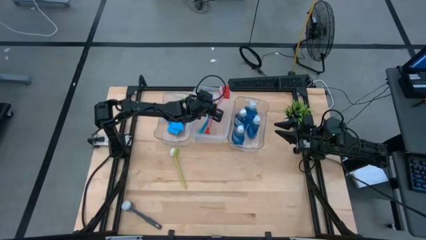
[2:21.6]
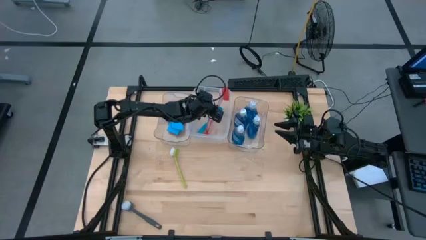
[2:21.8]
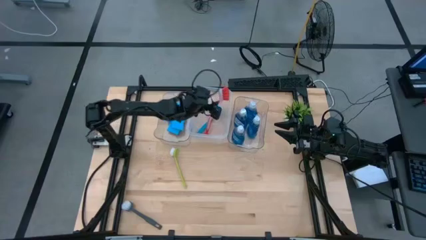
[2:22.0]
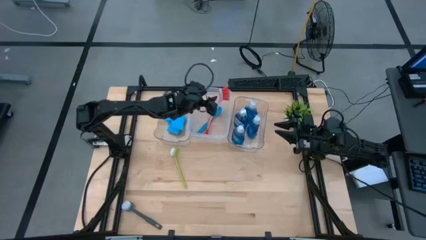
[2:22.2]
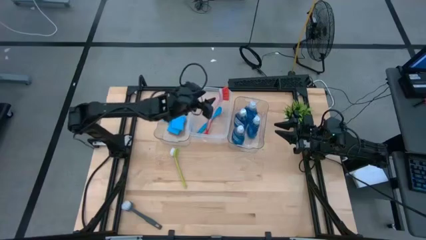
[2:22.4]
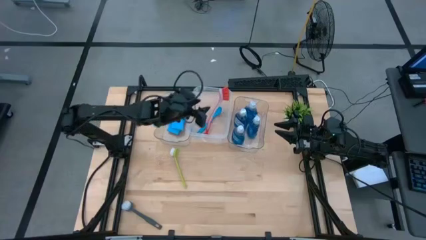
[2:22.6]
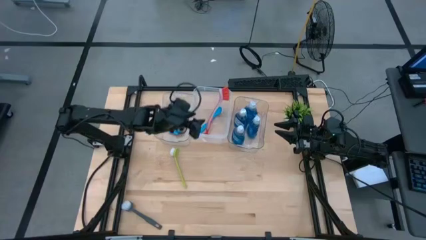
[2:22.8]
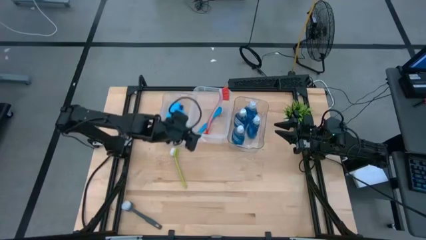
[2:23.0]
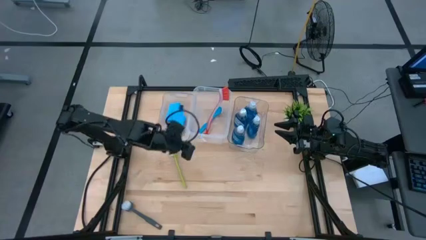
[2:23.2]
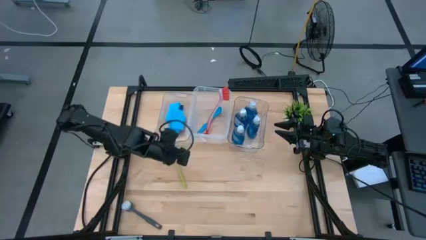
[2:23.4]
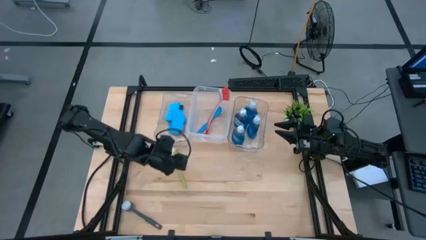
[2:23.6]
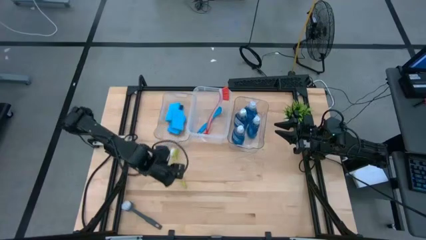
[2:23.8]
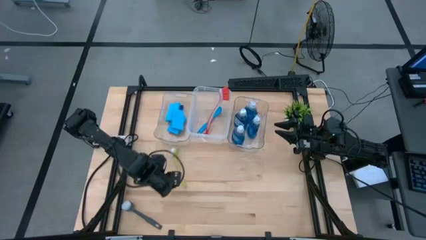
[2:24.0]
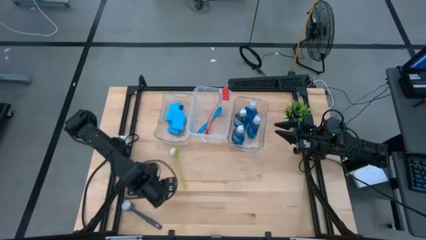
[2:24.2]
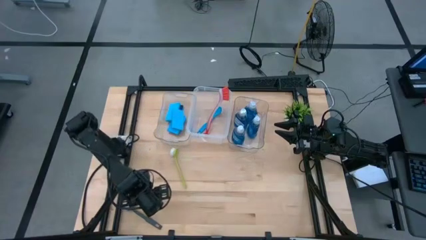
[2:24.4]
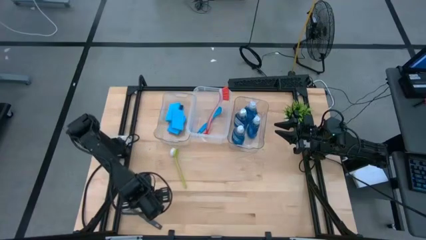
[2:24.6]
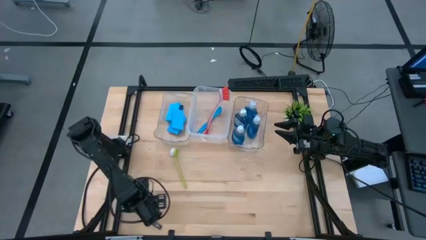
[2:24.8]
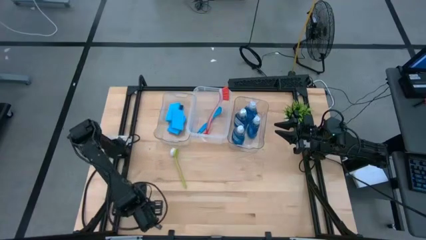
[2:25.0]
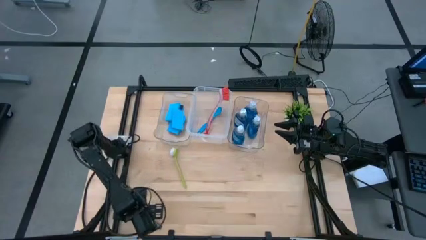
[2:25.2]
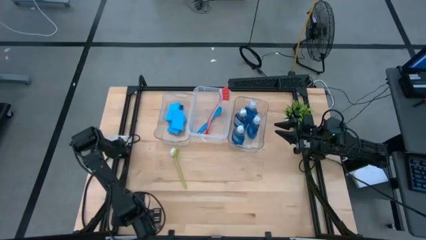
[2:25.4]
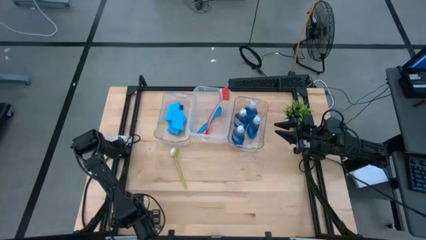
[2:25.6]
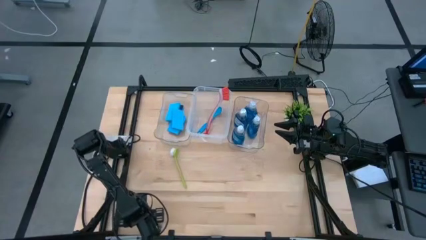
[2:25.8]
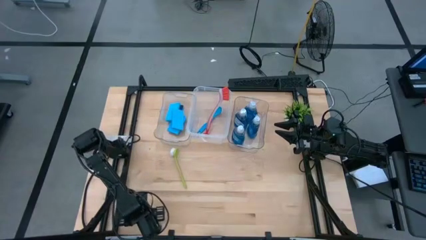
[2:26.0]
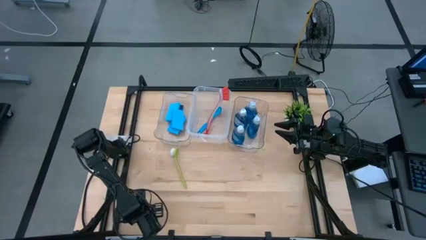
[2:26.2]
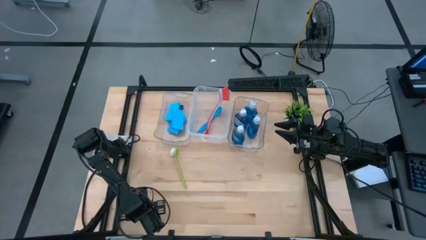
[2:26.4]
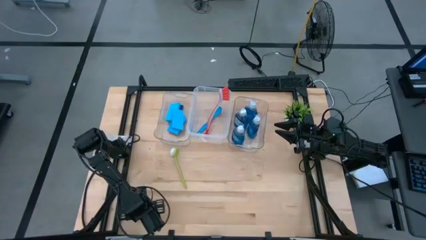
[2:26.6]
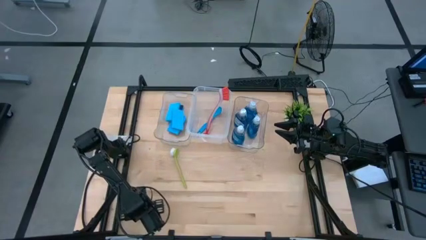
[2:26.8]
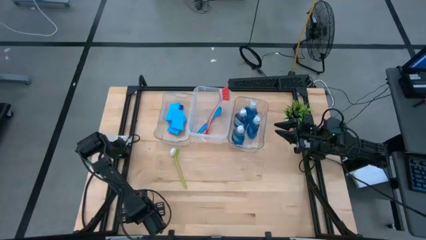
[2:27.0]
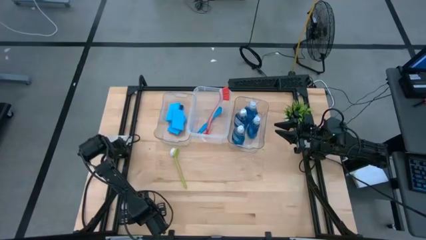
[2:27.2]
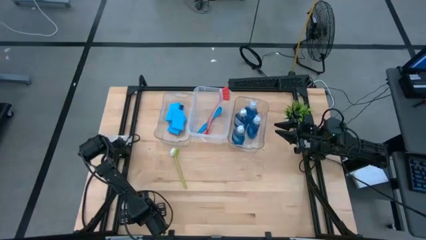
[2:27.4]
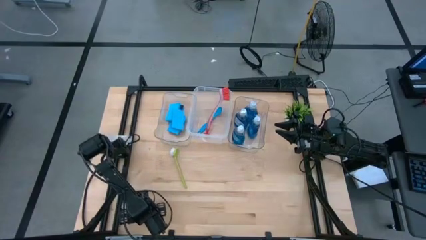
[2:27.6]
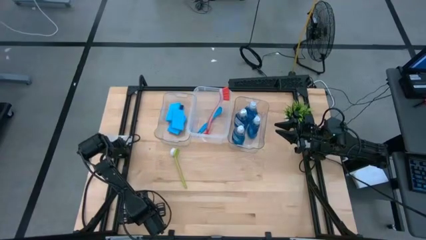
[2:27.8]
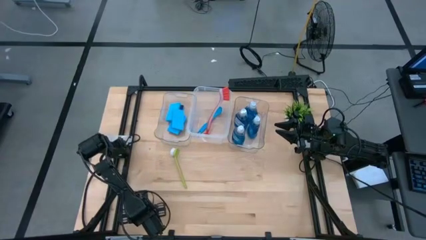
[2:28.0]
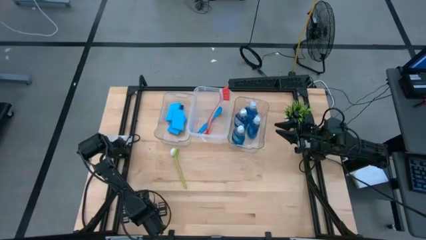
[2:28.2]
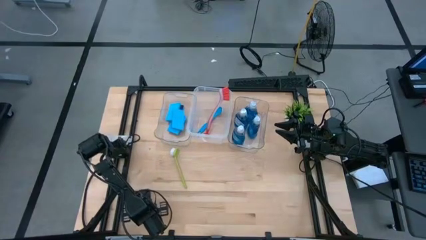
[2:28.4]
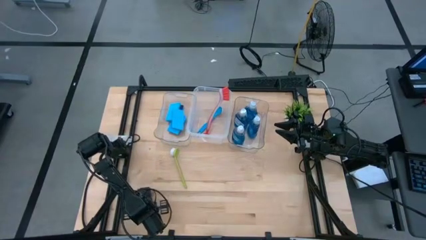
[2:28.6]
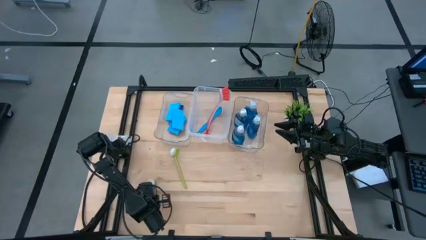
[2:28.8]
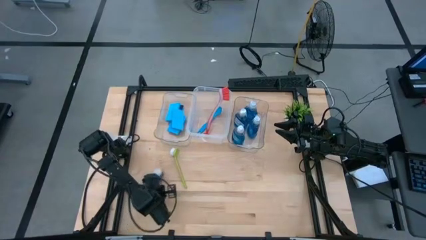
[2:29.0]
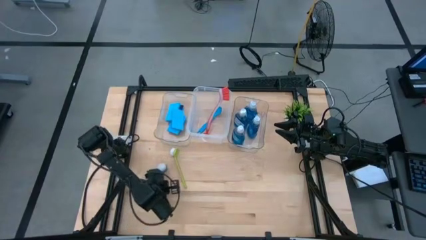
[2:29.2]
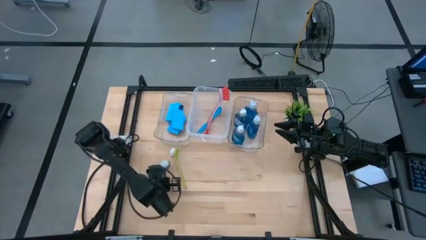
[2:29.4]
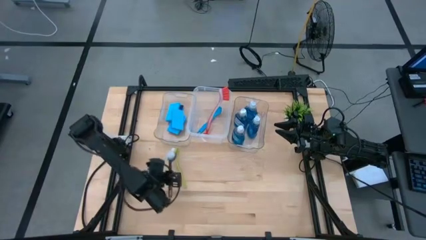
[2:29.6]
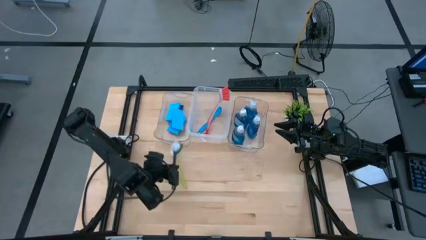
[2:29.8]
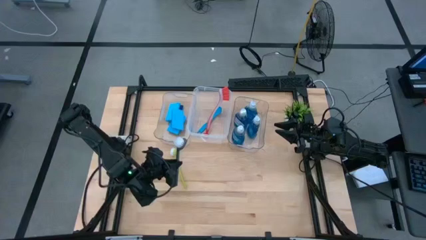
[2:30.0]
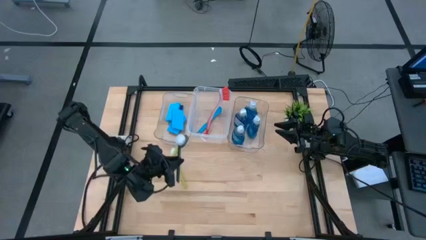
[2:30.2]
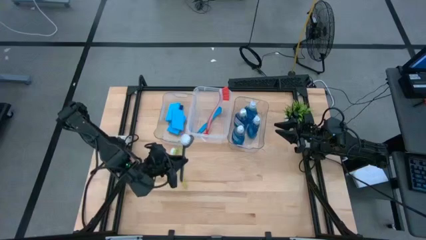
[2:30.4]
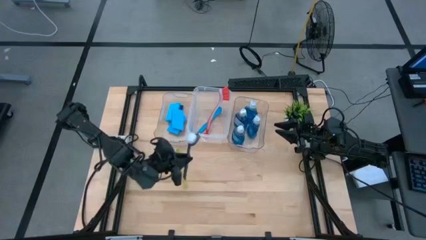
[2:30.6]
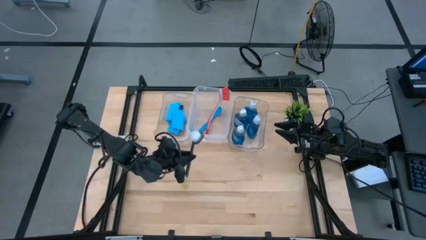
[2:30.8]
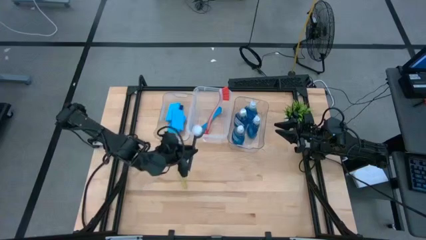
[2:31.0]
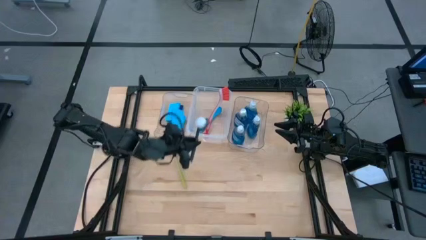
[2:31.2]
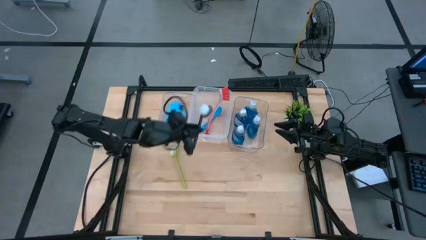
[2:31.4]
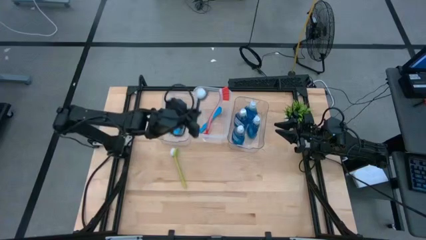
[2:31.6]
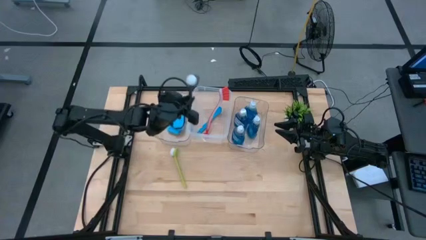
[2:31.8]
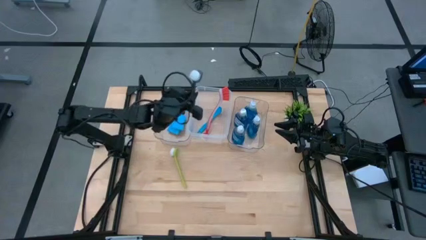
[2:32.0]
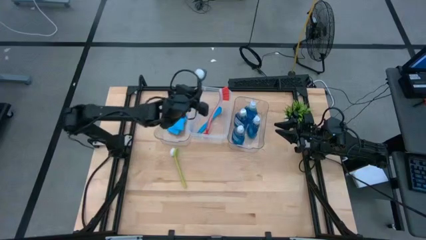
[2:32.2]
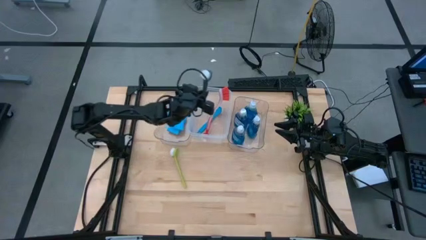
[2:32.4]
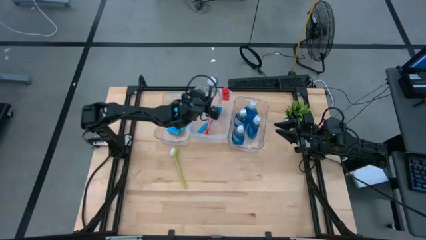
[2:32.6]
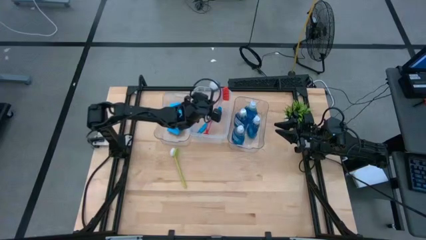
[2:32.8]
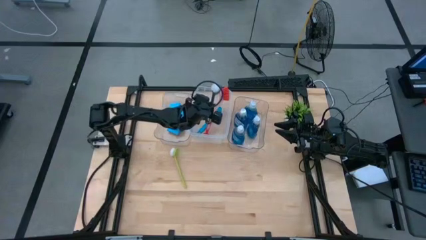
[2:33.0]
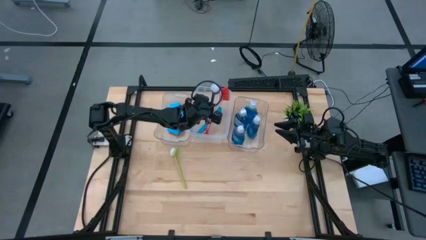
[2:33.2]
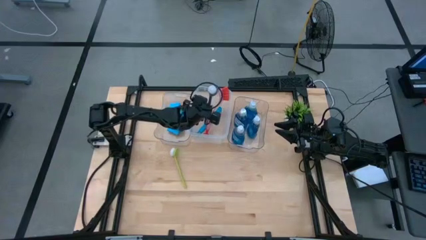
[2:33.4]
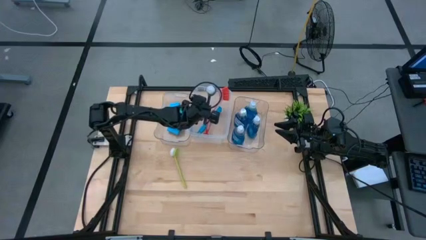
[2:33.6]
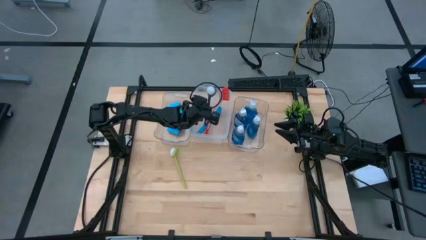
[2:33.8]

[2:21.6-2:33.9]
Task: Pick & Place Kitchen Sink Supplies
Put the gray dish brush into the middle transparent bin
